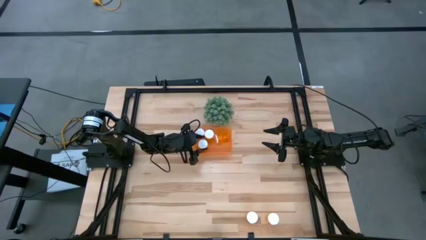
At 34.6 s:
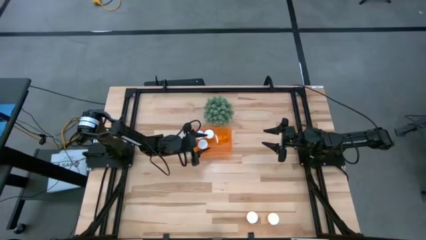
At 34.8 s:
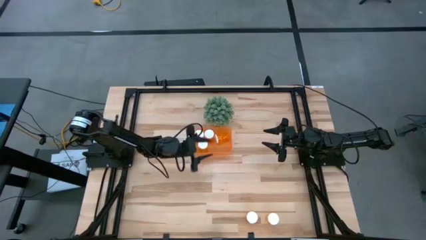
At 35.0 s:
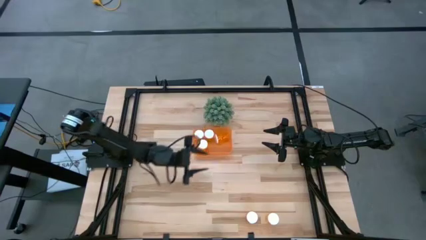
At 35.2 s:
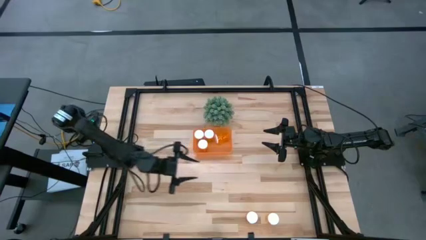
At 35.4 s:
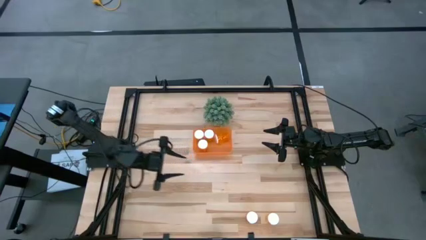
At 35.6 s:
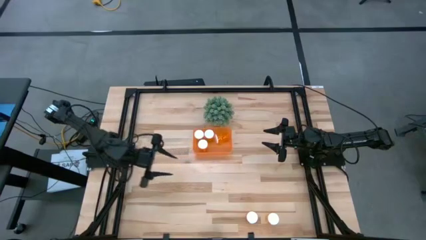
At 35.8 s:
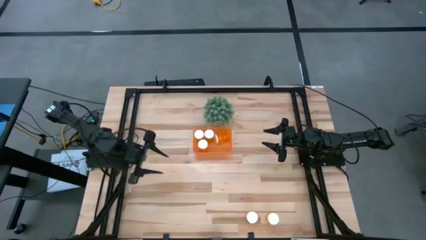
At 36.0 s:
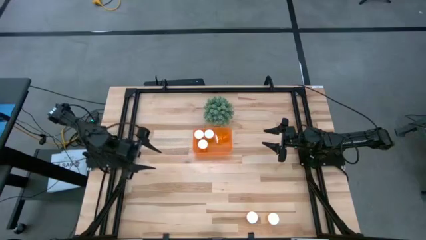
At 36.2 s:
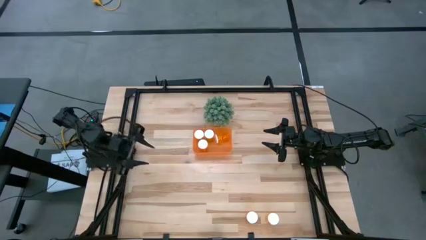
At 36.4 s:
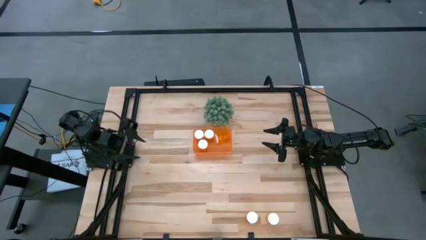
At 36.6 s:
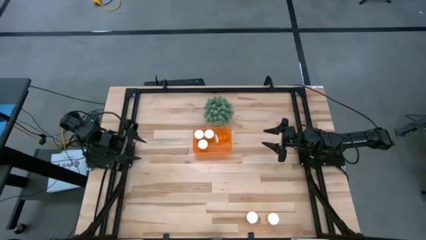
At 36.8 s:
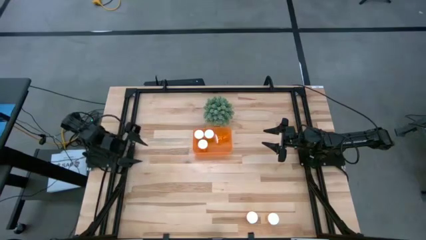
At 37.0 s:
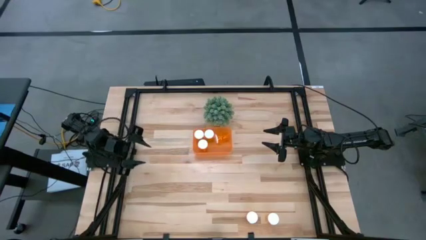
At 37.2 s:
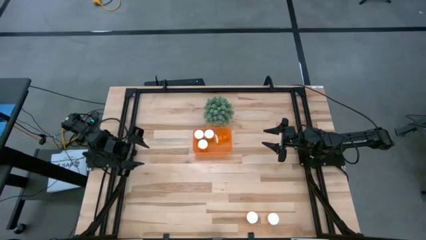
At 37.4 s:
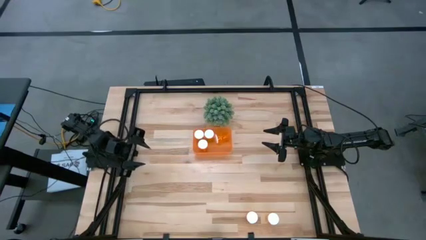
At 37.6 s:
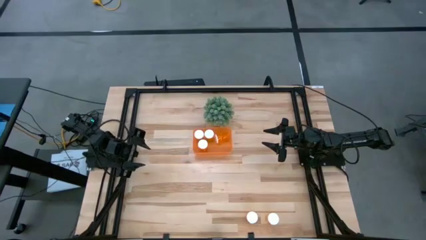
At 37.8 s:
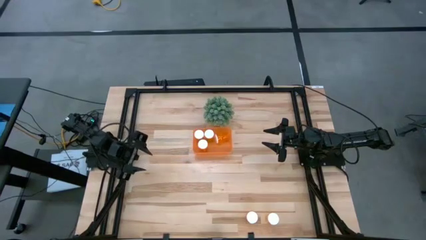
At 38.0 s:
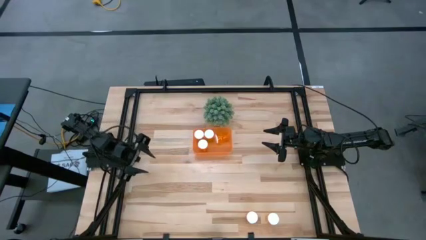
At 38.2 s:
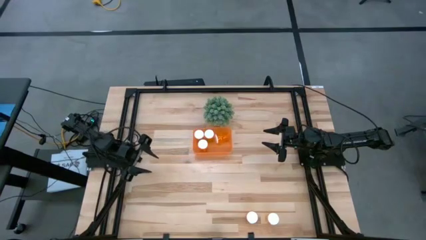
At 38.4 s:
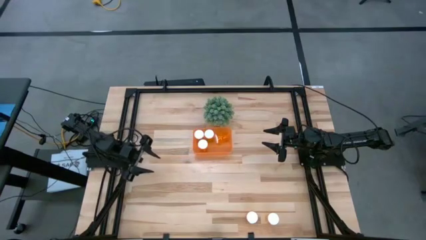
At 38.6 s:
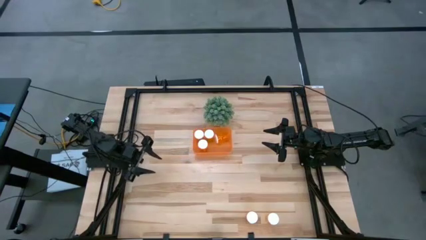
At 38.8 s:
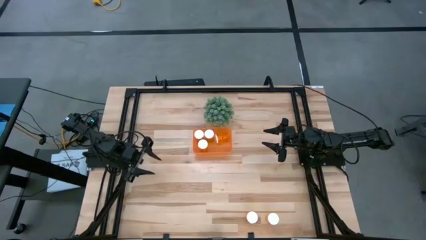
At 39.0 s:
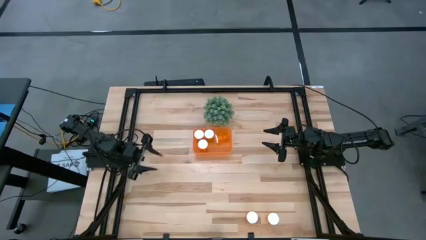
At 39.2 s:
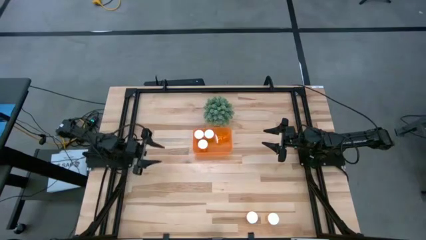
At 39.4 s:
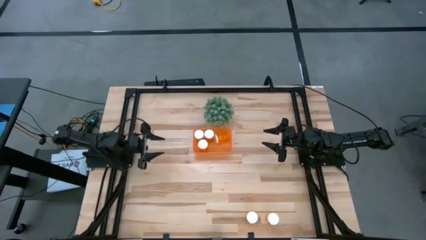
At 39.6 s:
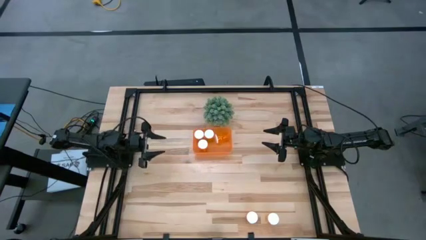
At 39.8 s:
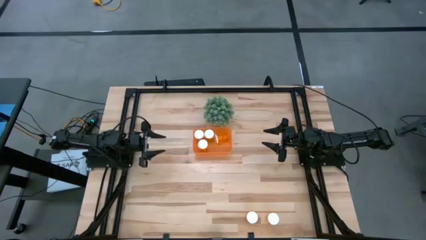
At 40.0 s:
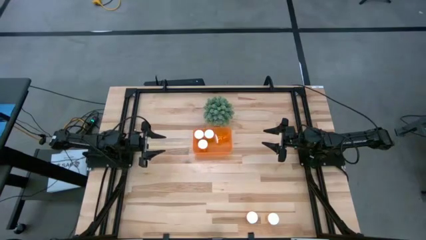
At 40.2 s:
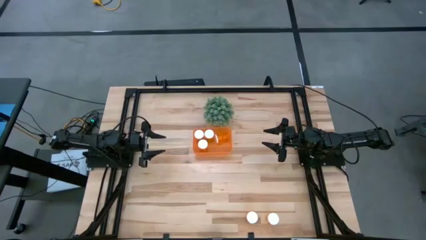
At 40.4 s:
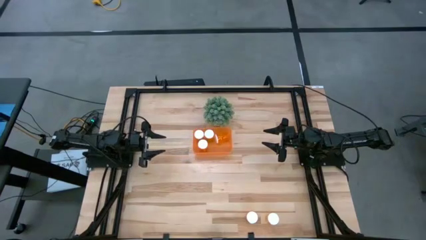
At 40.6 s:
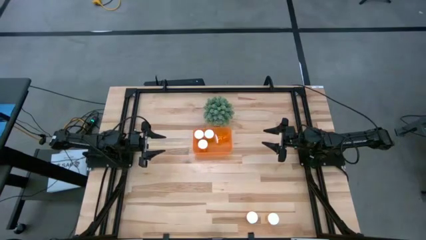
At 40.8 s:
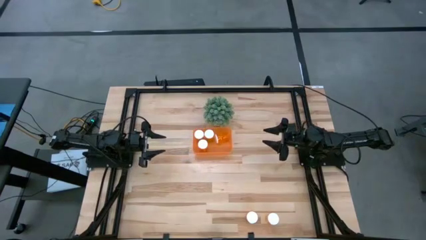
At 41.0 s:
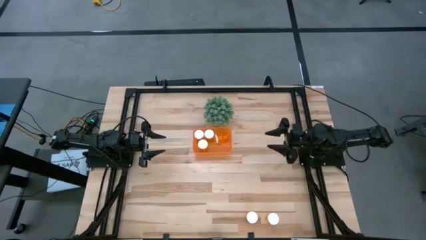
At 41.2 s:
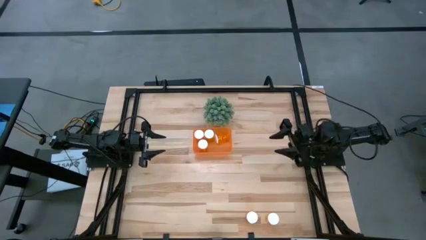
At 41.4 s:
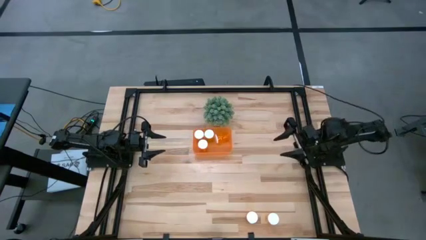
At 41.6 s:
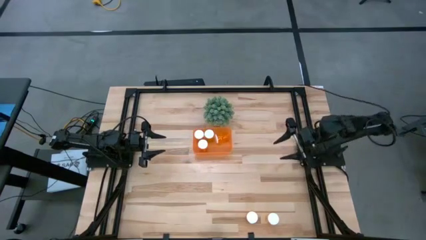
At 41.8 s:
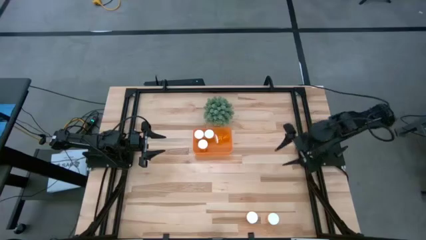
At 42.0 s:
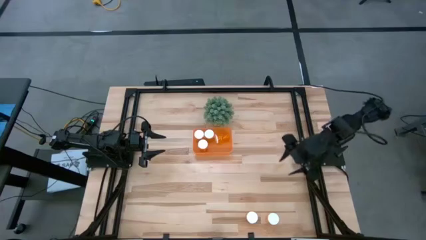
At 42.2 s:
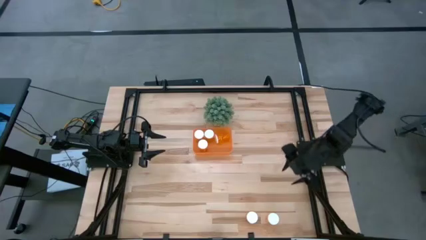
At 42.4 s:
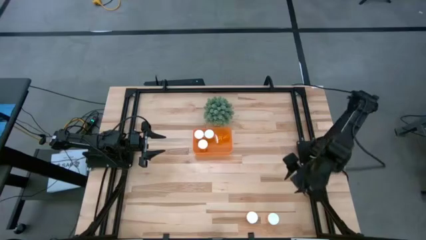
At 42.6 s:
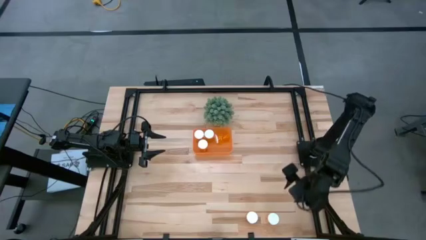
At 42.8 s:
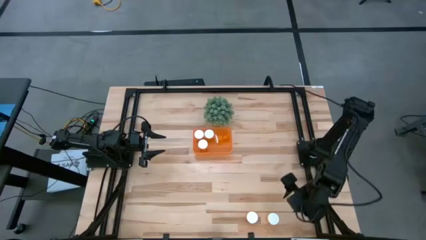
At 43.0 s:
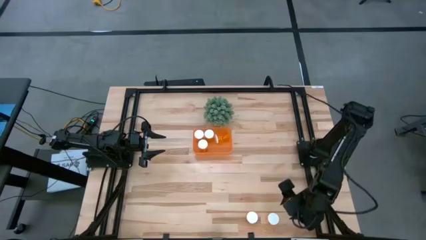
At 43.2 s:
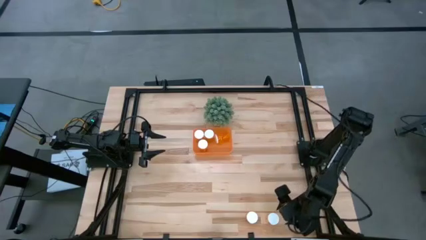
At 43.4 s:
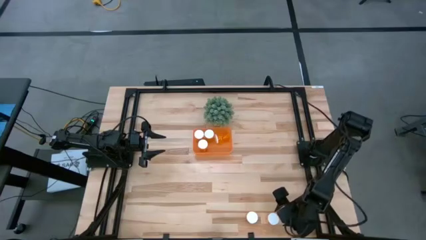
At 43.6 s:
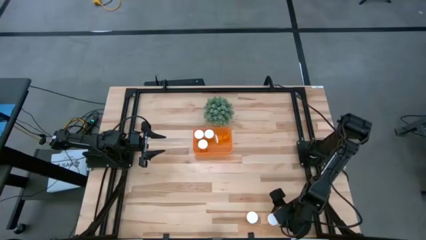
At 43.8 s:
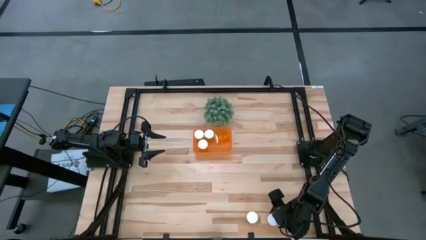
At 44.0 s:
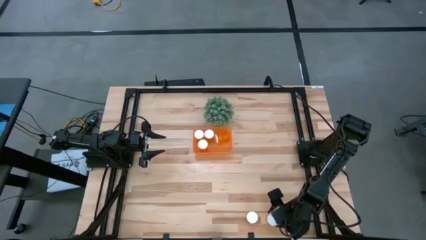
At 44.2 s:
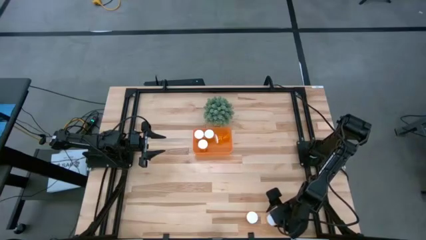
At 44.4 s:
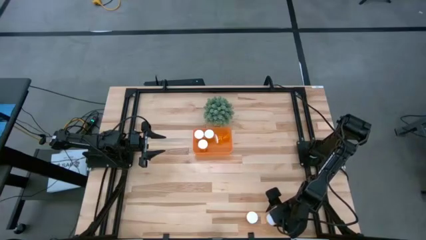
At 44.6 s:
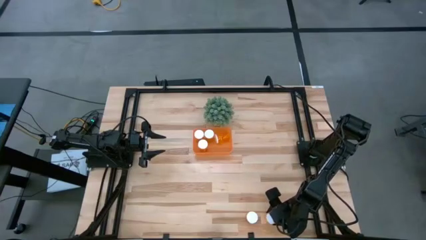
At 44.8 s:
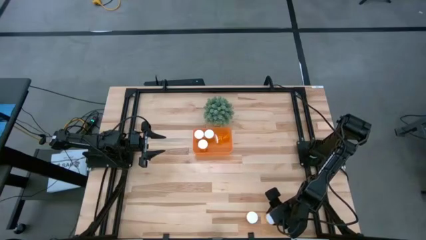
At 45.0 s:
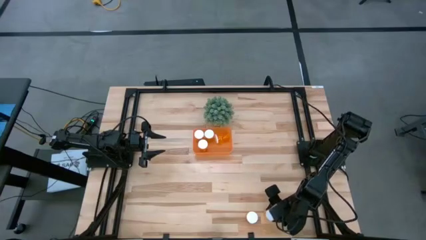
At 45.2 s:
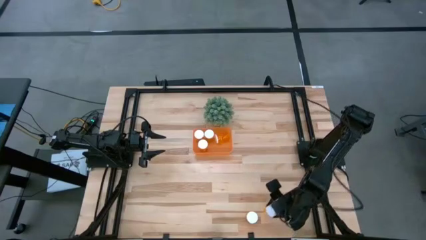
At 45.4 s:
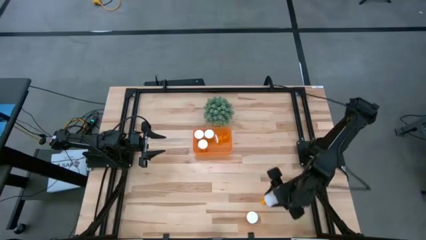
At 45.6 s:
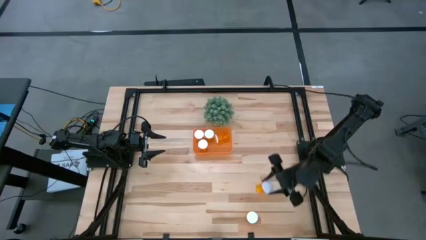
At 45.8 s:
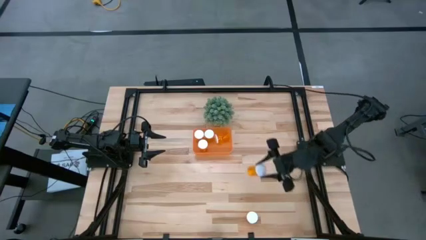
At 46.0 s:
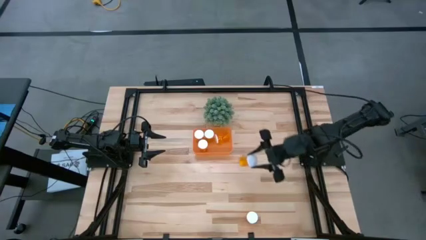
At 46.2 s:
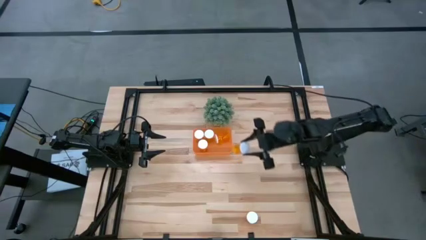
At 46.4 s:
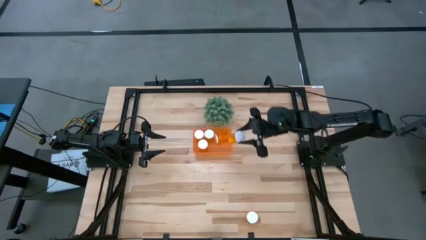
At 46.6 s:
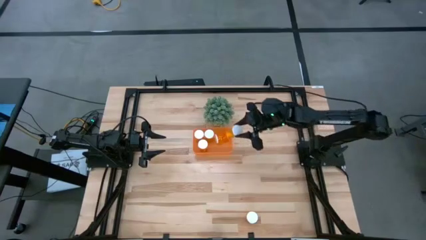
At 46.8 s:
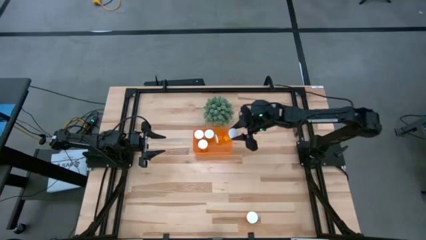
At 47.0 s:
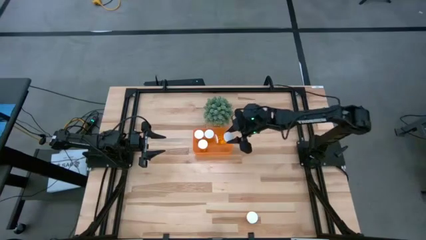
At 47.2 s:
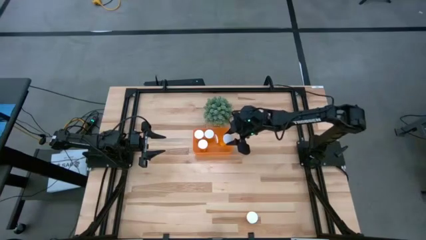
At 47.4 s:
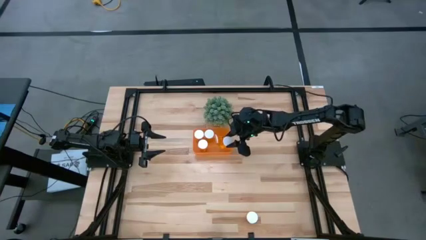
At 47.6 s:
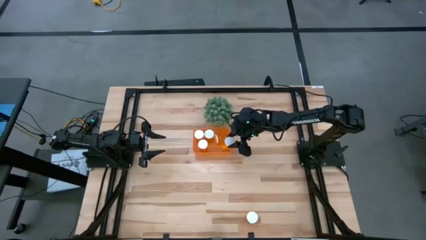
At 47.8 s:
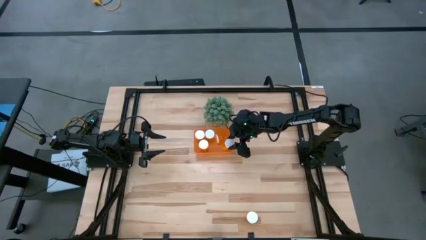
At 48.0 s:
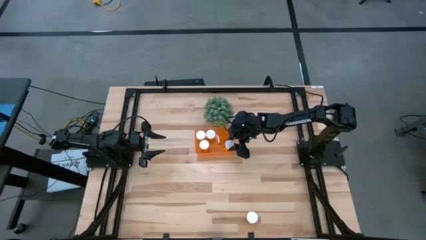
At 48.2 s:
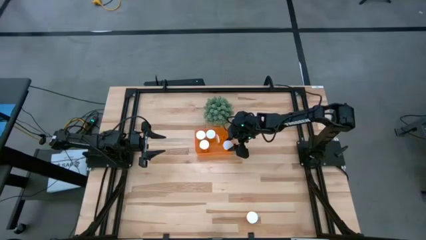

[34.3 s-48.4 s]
Task: Pick and place pill bottles into a basket
Put the orange pill bottle into the orange bin

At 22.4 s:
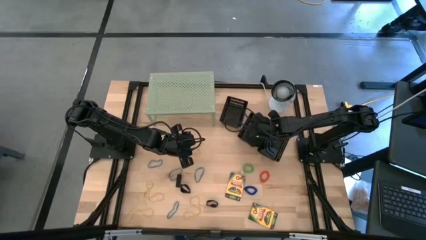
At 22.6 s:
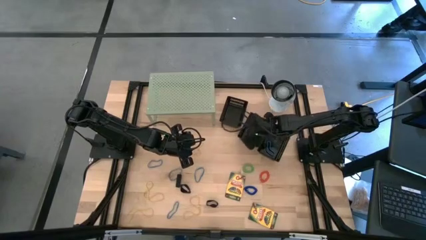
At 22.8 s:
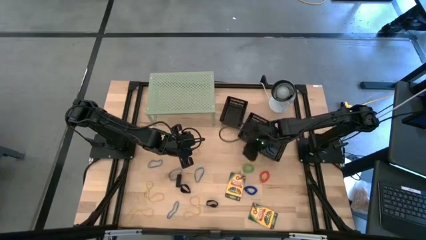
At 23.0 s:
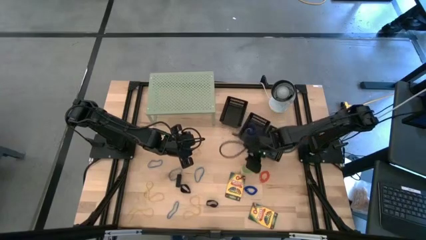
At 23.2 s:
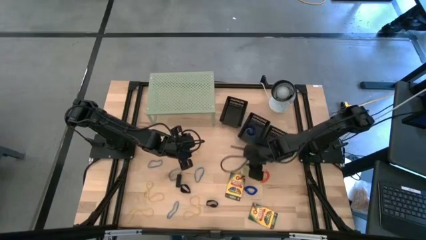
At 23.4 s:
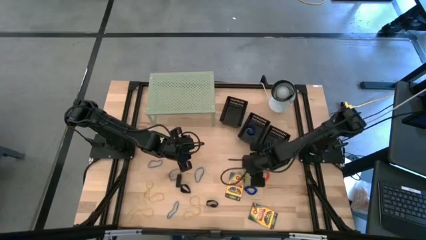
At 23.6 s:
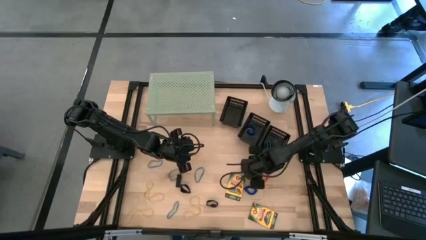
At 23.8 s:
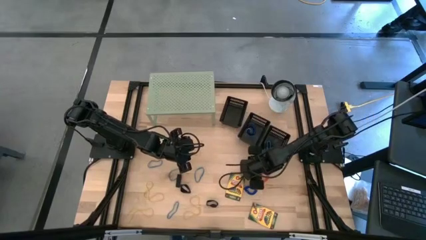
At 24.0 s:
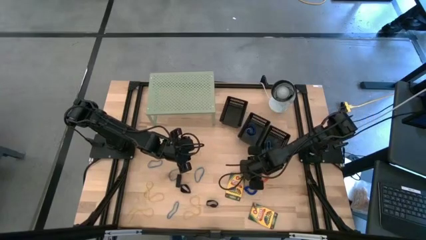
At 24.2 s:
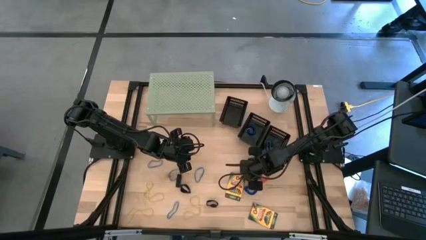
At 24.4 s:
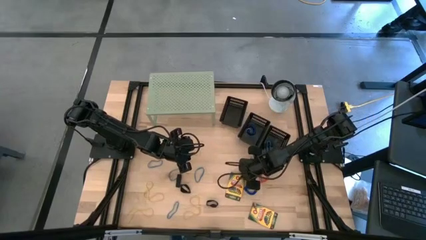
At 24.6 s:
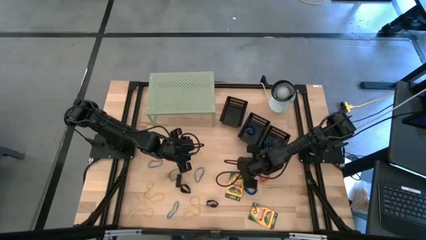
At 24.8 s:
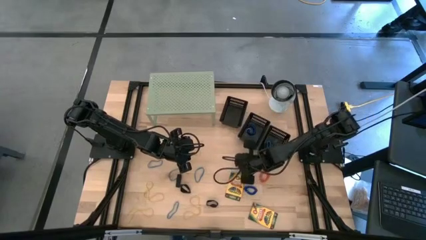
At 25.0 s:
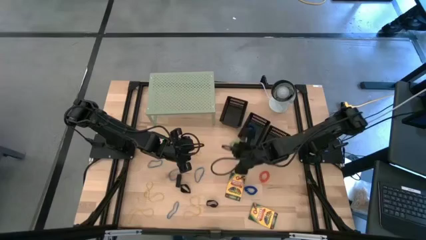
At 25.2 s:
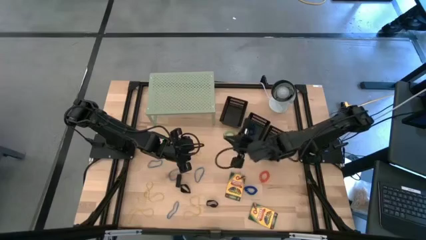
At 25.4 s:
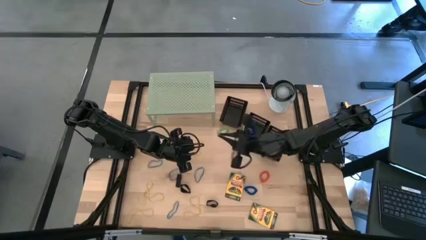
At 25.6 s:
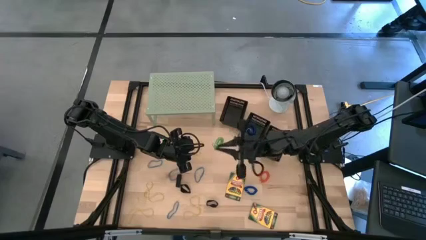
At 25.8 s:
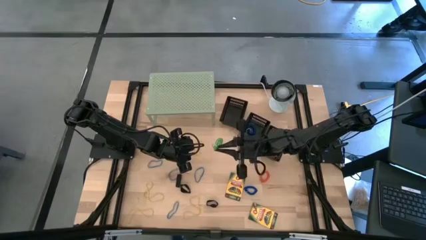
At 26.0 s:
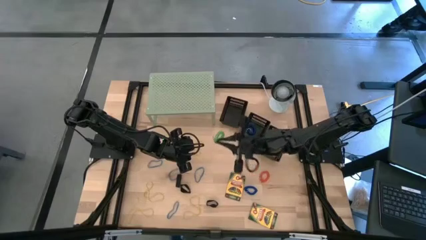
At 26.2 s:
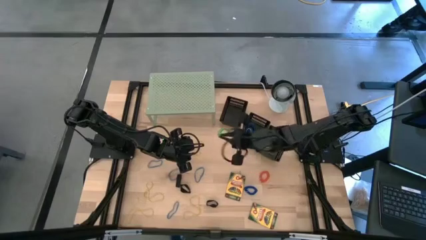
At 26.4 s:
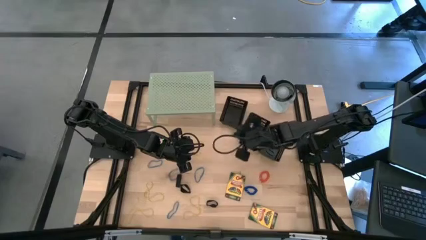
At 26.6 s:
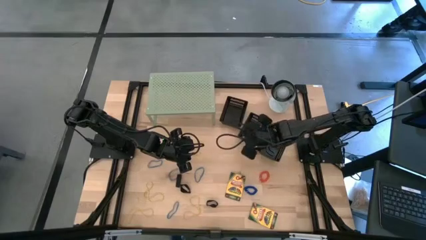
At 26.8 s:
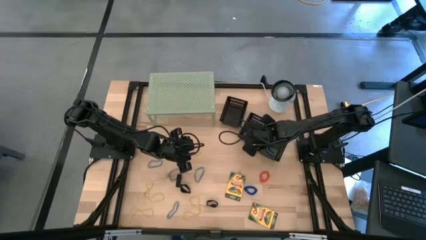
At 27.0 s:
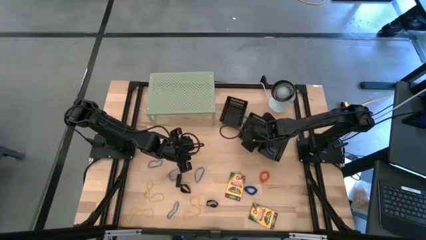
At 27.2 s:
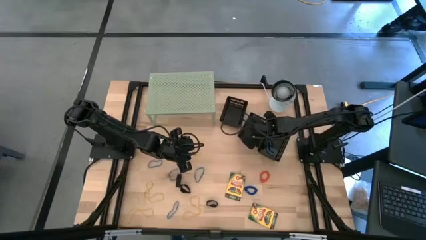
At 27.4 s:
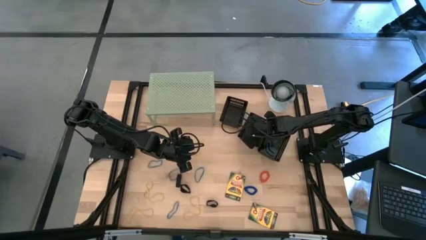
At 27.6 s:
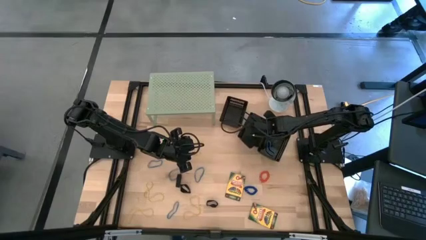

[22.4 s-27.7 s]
Task: Pick & Place Office Desk Supplies
Put the green spring keychain into the middle black bin
